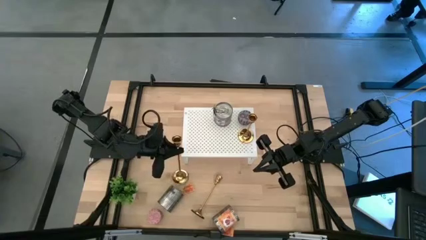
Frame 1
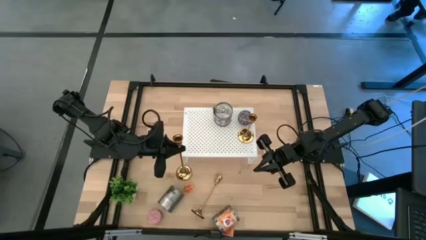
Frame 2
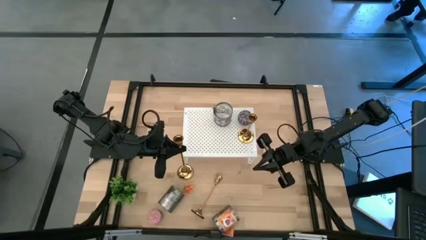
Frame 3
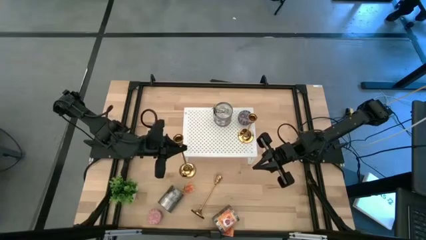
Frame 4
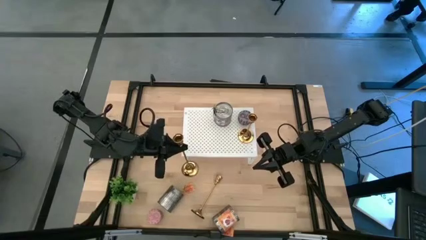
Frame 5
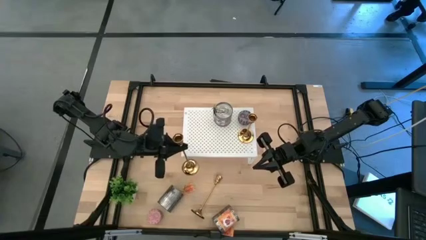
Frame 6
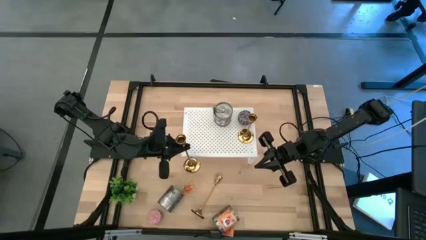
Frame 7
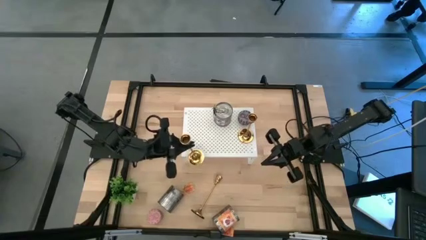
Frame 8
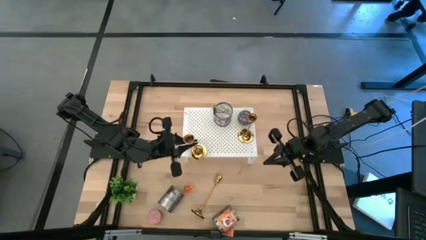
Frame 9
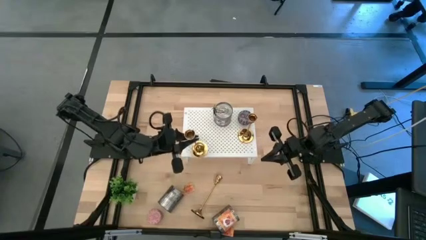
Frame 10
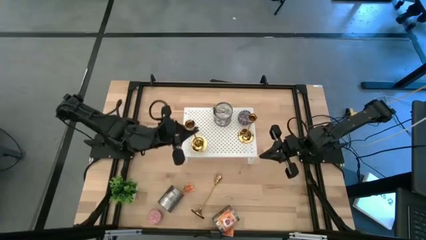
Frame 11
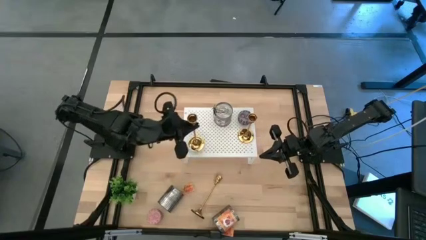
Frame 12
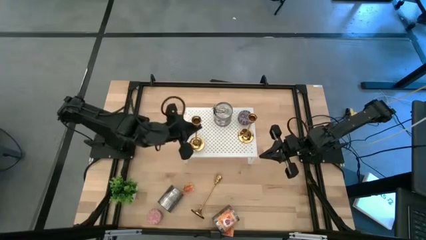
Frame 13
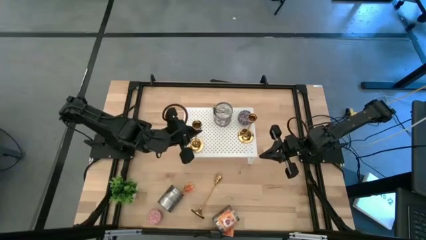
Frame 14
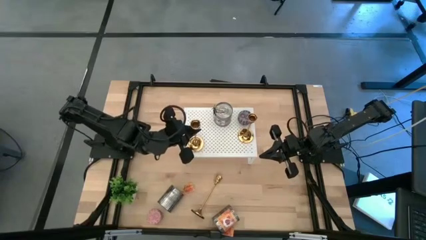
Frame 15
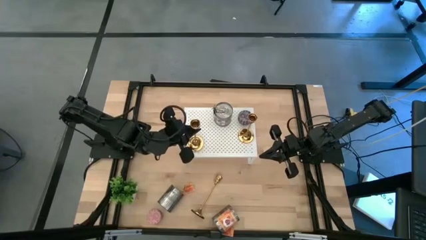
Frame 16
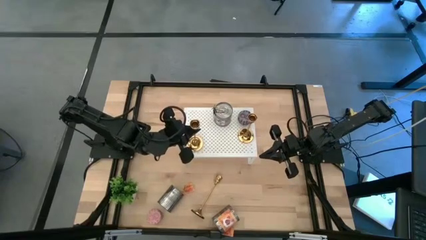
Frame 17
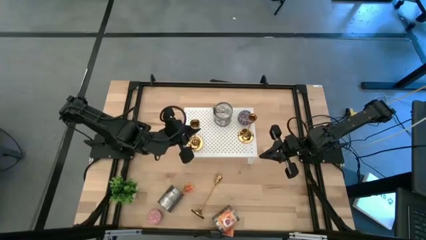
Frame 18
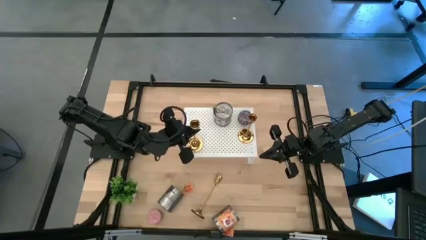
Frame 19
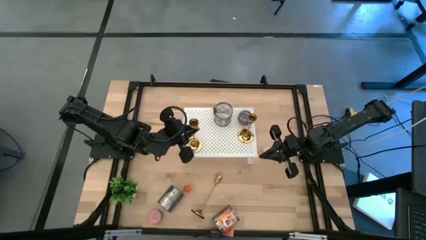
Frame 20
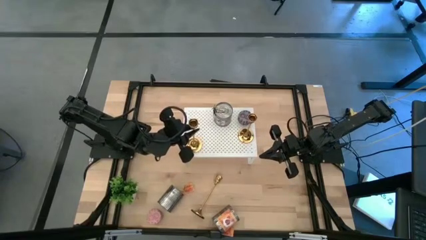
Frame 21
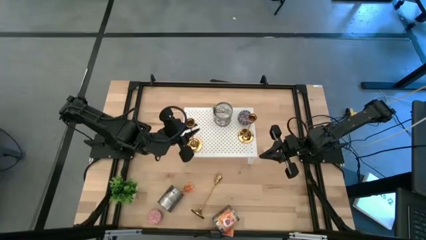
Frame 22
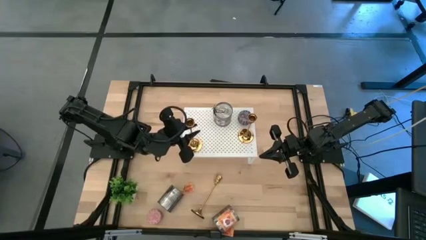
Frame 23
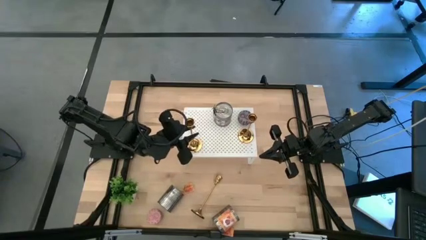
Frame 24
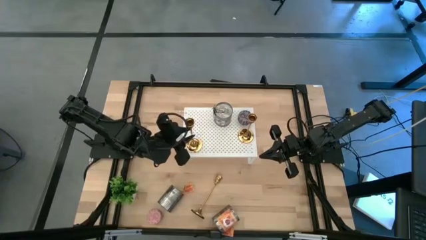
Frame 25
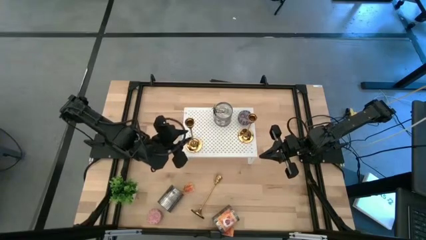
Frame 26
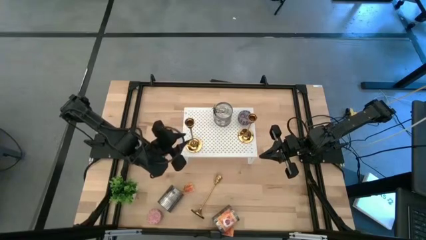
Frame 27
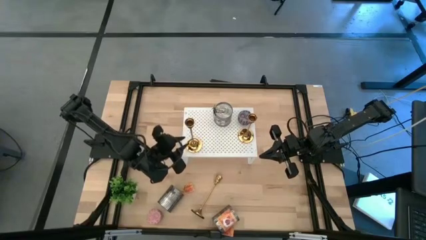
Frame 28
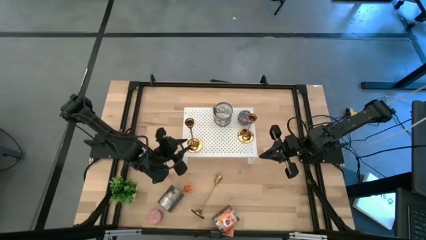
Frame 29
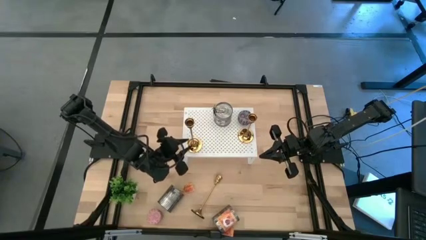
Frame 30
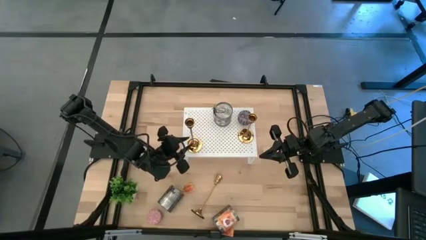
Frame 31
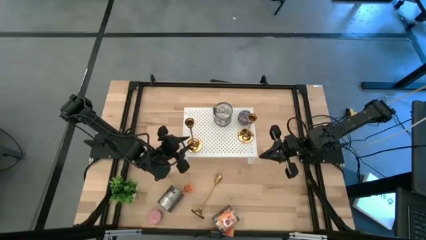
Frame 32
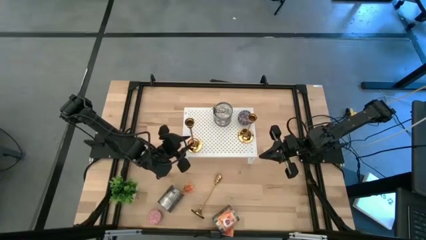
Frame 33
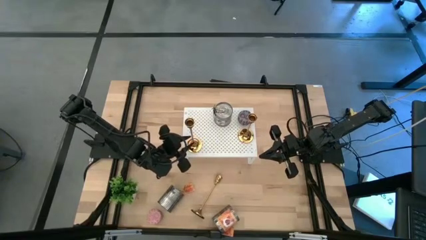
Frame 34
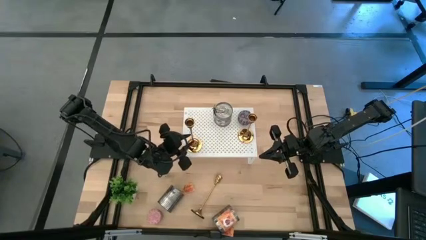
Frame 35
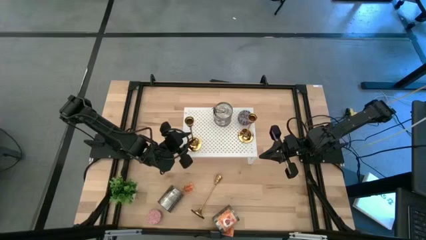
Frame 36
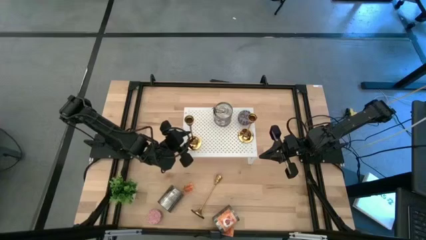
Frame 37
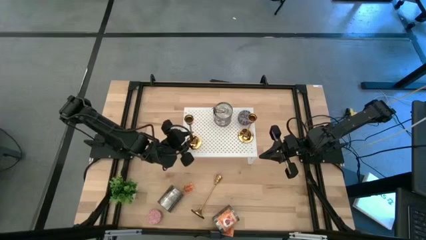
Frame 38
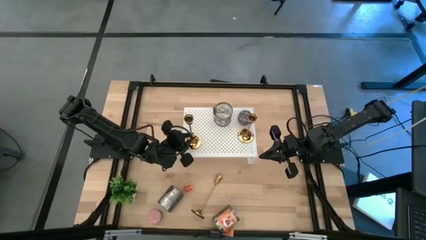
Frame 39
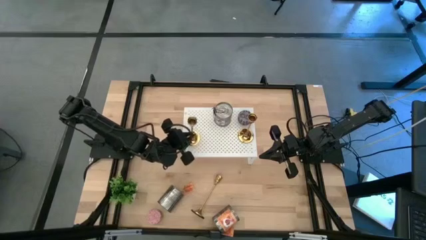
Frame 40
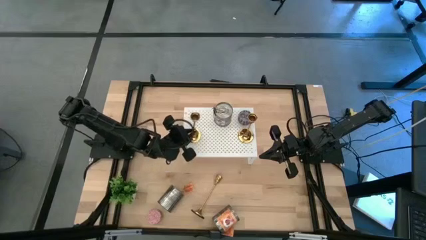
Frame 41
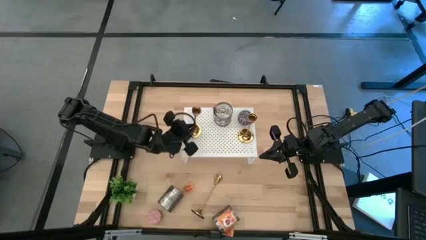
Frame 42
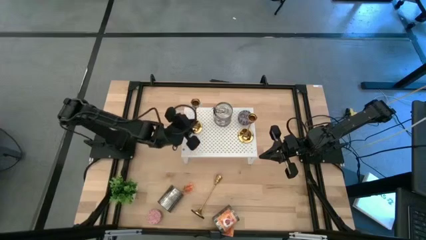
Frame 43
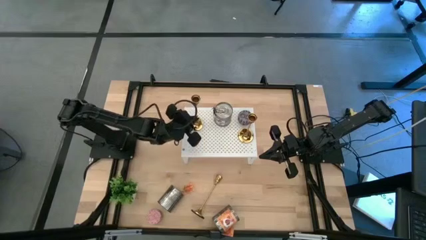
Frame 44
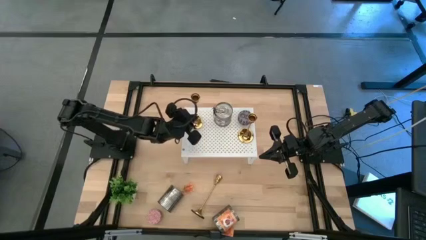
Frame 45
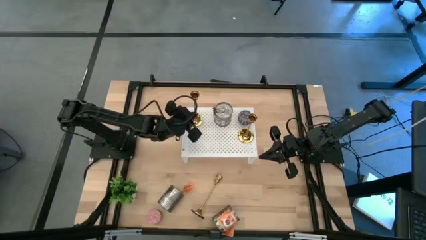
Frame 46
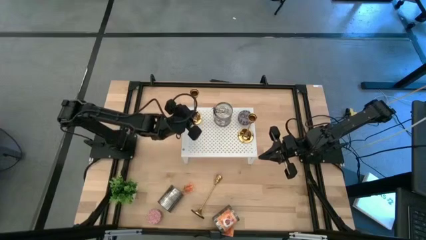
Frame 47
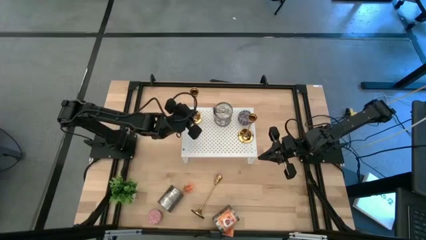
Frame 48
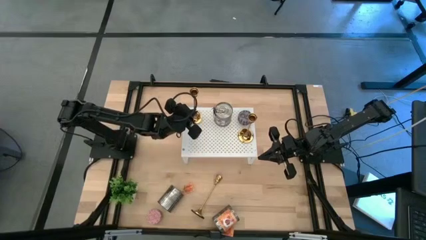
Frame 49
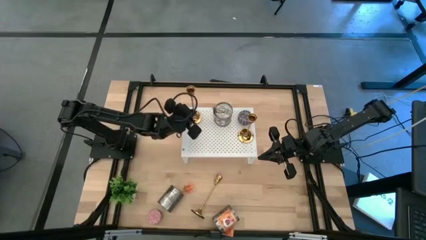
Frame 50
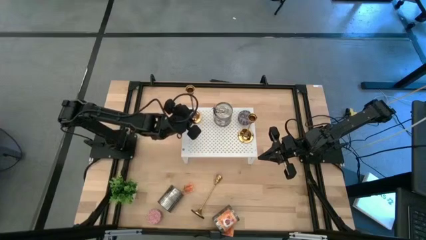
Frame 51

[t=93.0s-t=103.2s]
Task: Pick & Place candle stick holders
Put the left gold candle holder on the shelf

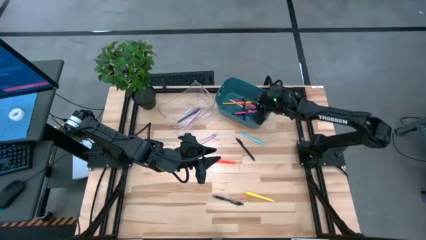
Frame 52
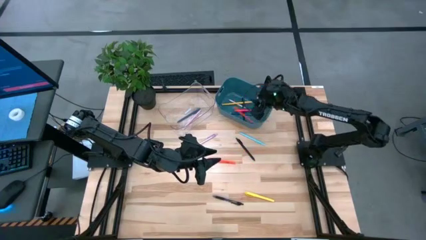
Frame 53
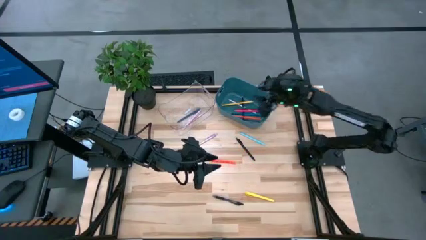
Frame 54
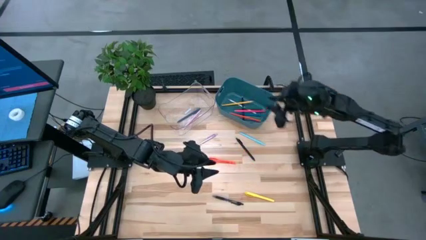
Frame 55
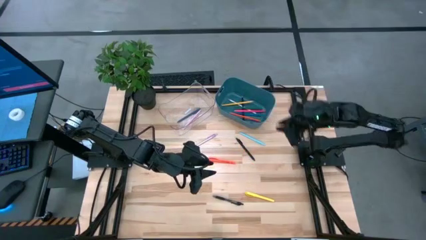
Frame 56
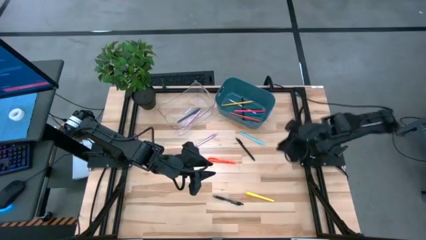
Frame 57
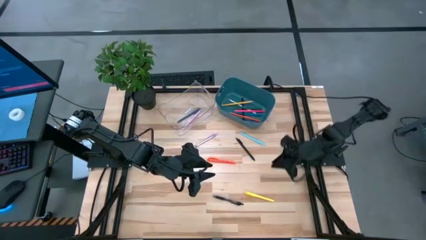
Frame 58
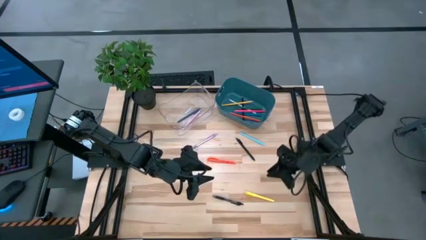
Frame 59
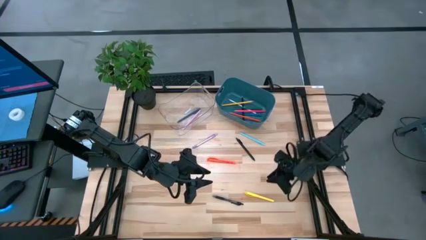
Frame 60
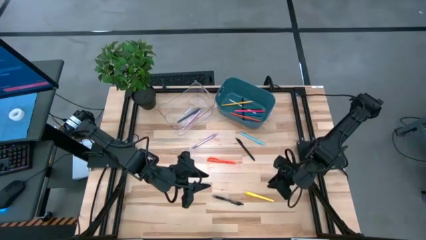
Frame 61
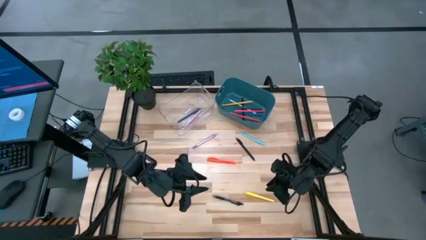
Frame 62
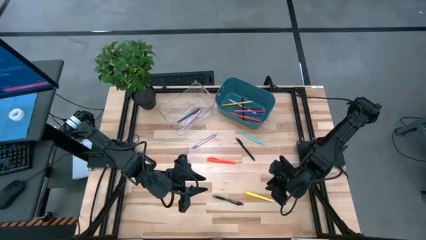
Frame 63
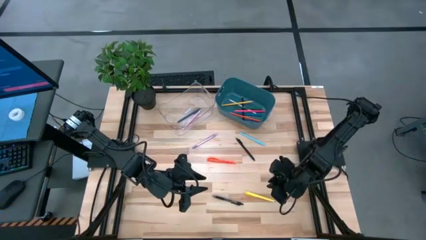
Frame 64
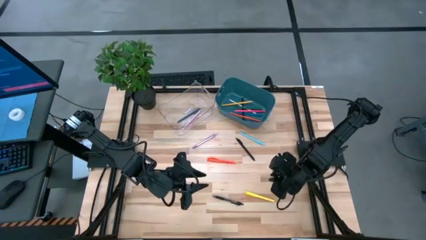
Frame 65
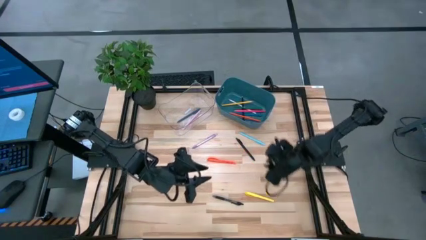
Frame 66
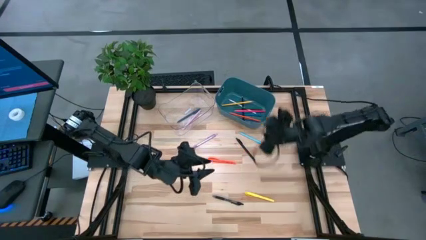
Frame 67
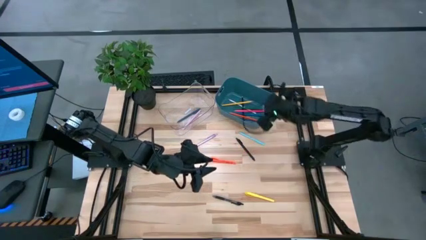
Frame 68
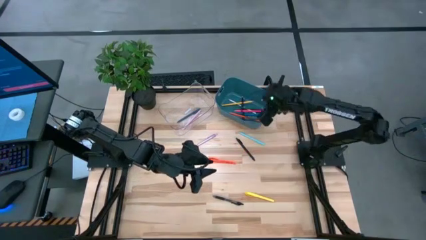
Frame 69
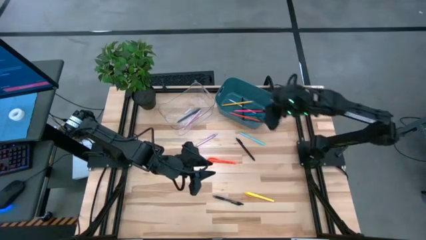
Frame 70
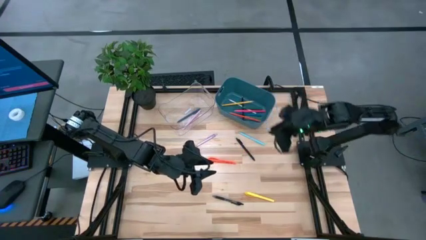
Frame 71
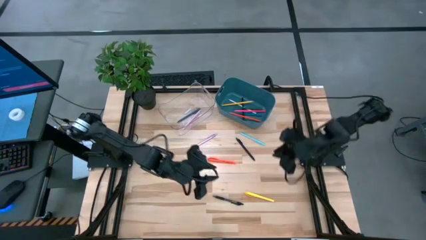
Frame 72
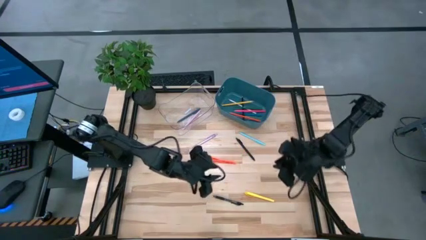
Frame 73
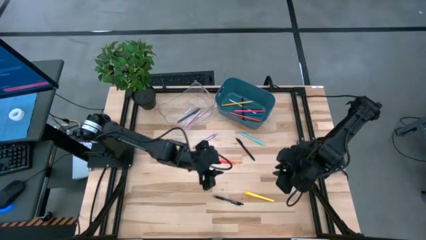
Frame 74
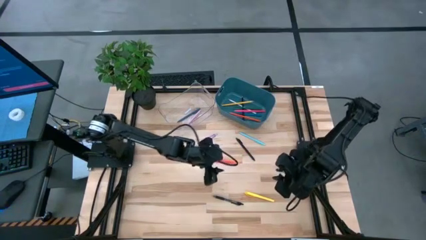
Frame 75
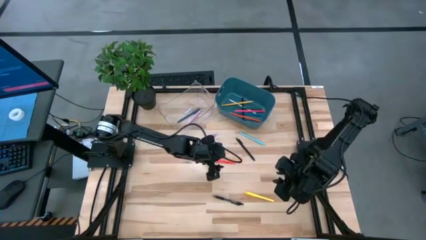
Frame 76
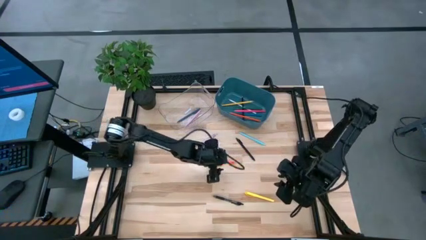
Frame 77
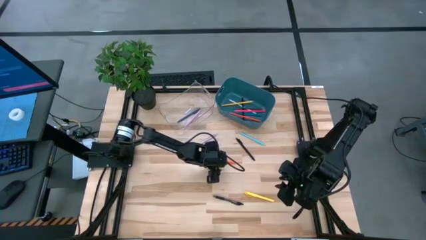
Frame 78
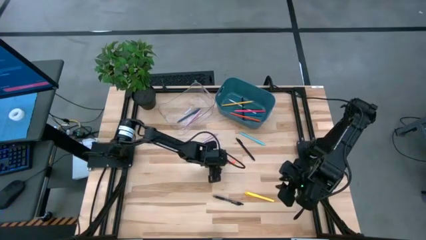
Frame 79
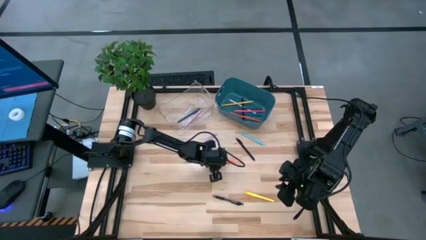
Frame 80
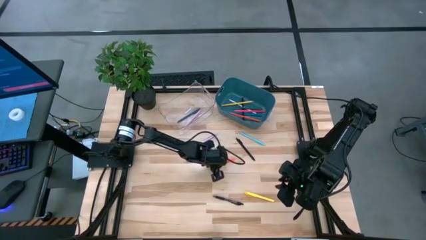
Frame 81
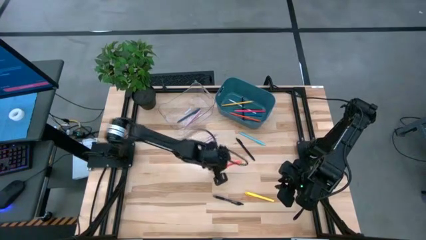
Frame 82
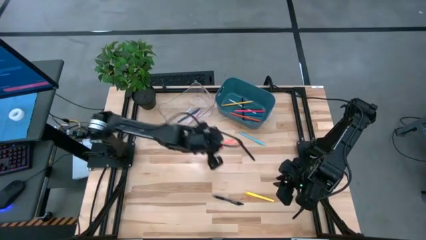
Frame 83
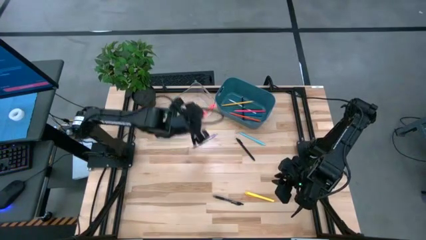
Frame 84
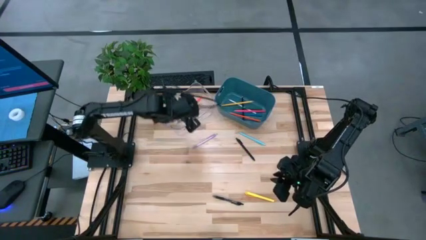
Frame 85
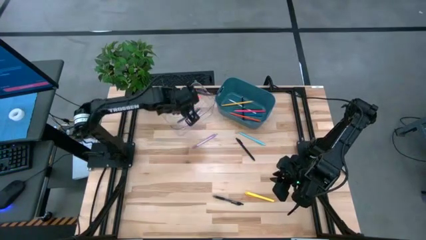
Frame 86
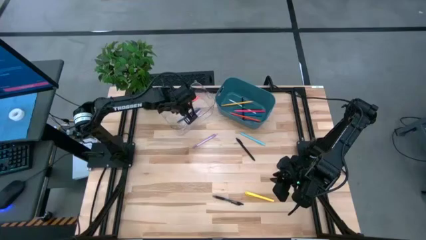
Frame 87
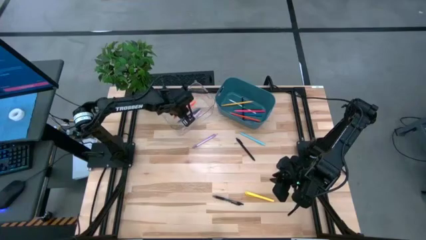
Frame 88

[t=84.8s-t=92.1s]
Task: Sort pens & pencils
Put the orange pen into the transparent bin
